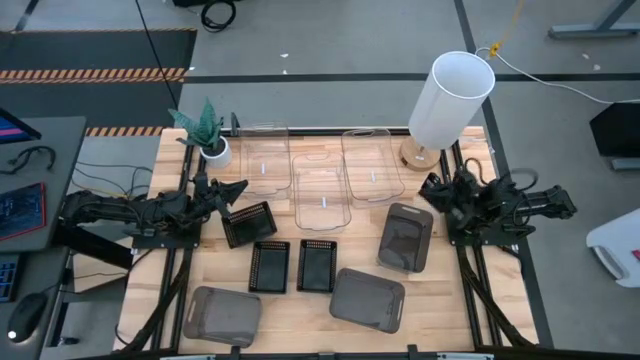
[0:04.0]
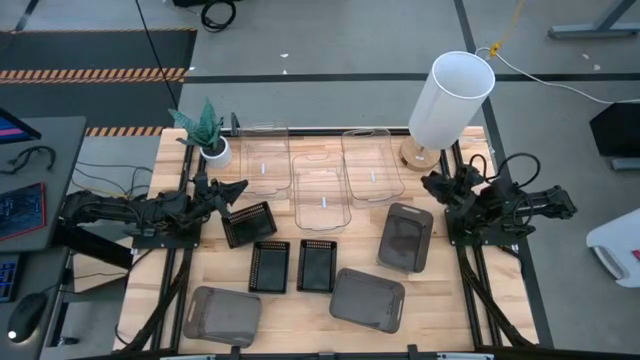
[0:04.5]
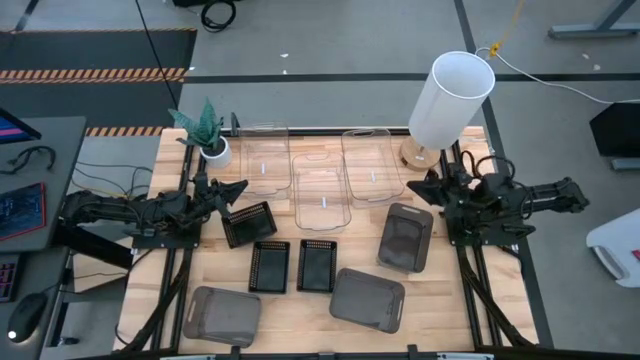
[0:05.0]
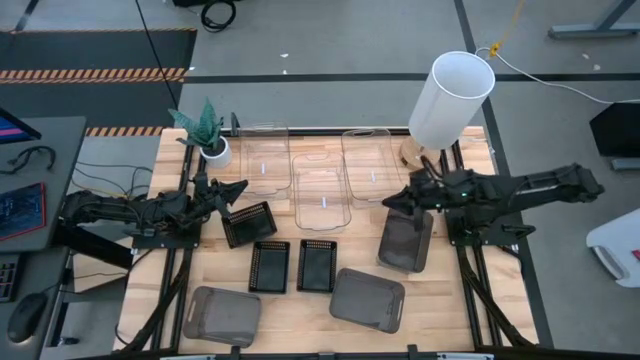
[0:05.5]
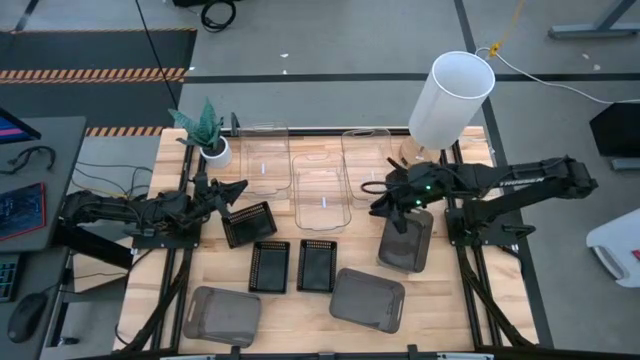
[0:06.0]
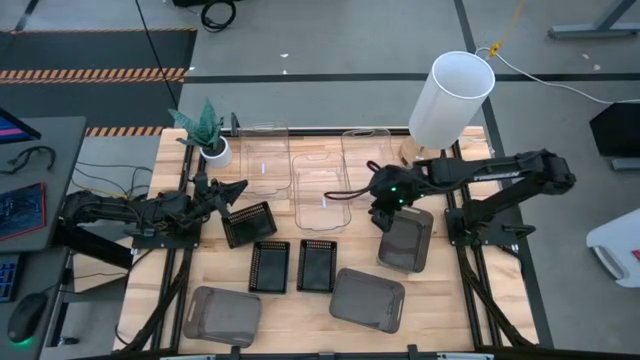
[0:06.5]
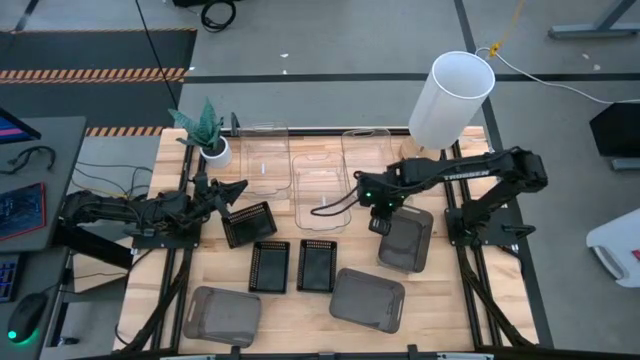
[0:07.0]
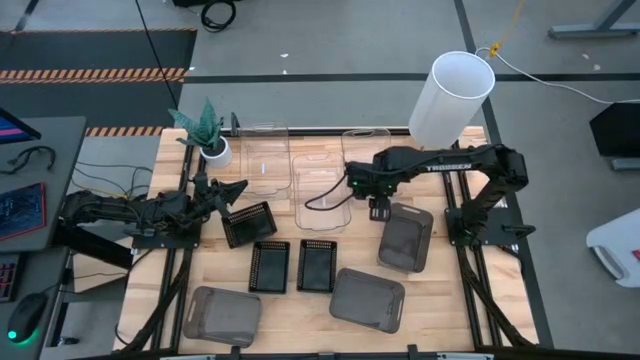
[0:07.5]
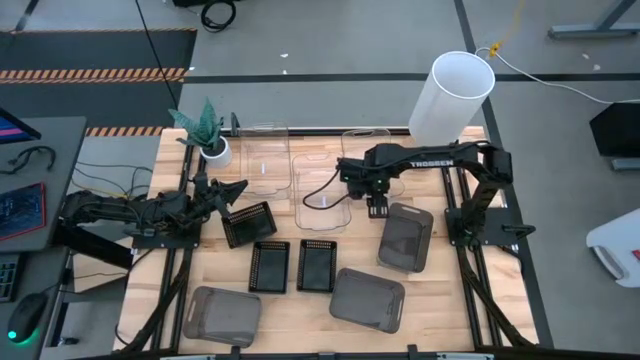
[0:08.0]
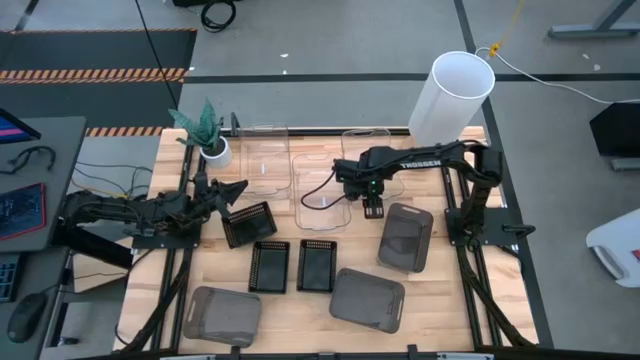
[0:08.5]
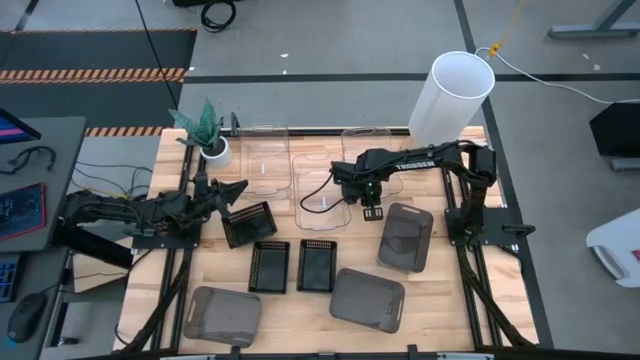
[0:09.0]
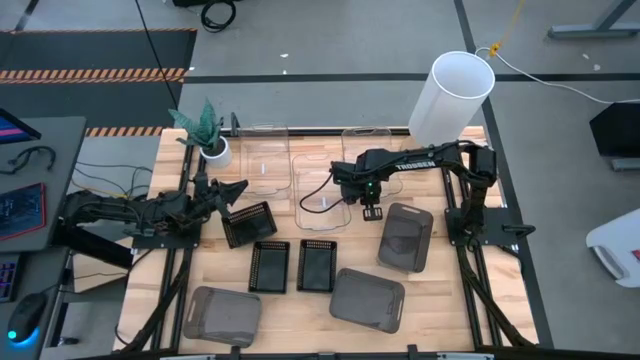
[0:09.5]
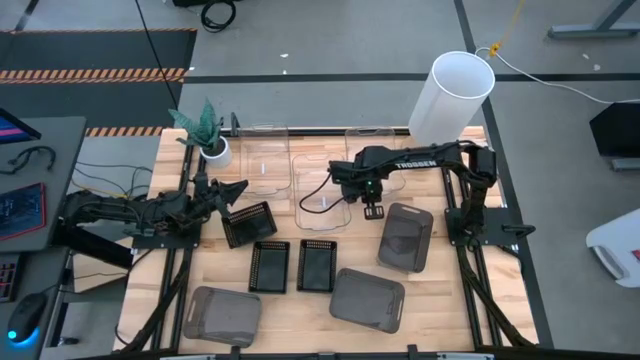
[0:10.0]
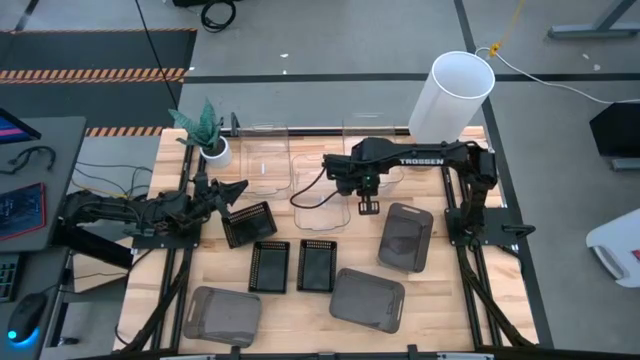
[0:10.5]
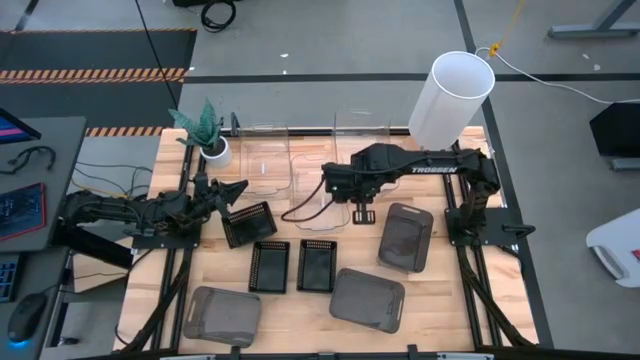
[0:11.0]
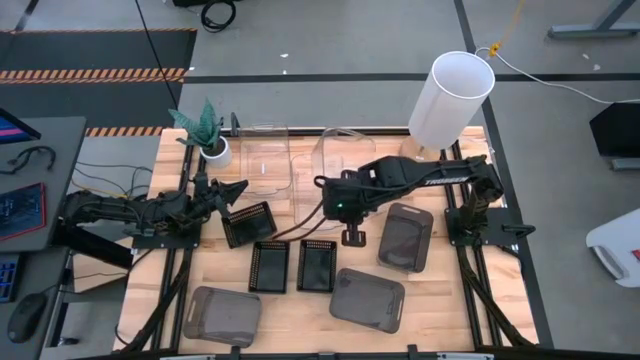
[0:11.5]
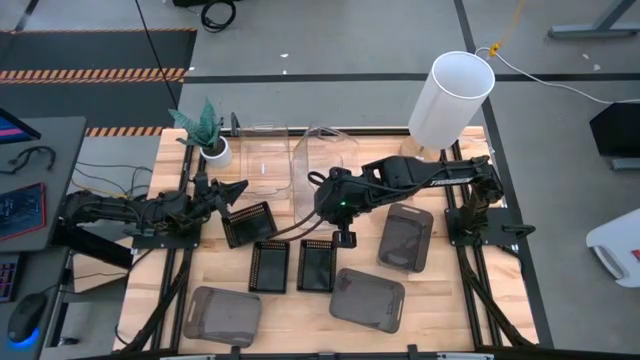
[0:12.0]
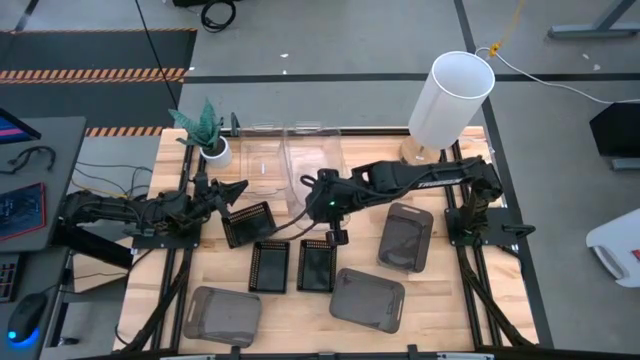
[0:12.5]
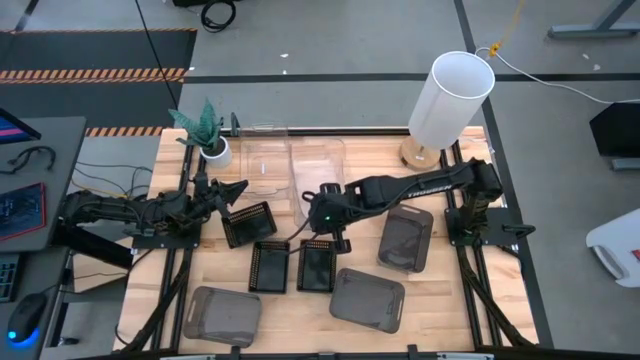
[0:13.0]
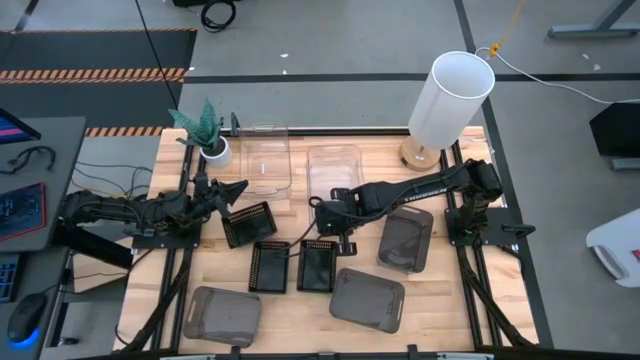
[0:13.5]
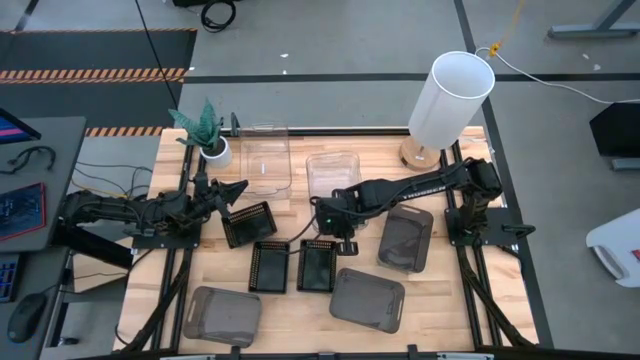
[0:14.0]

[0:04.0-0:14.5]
Stack the right transparent bin on the middle transparent bin

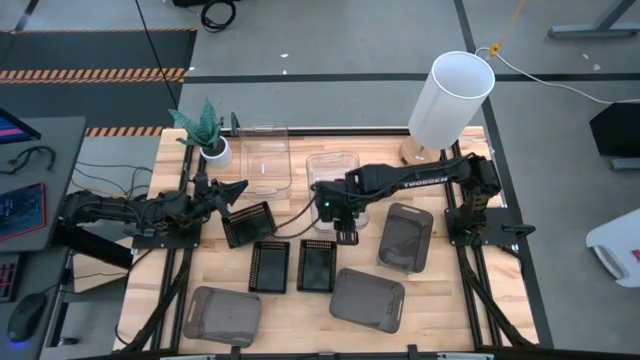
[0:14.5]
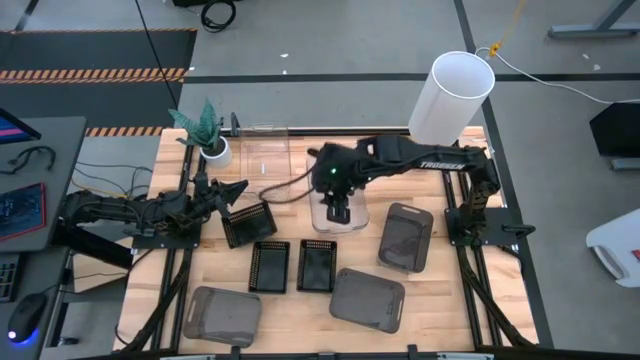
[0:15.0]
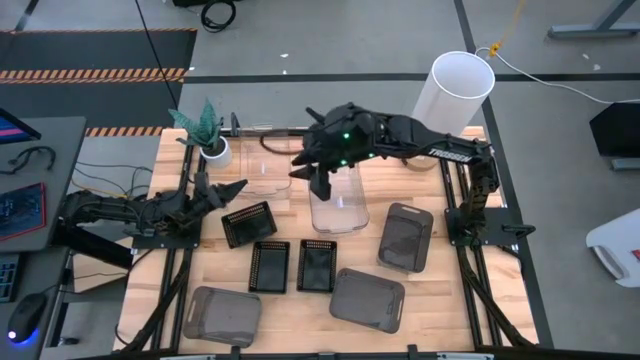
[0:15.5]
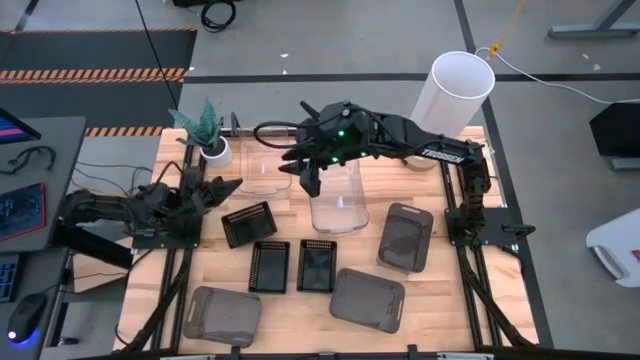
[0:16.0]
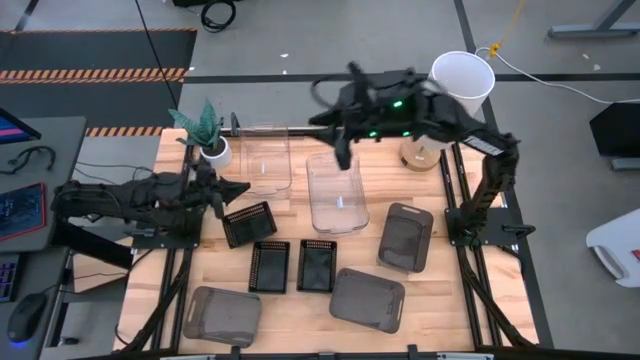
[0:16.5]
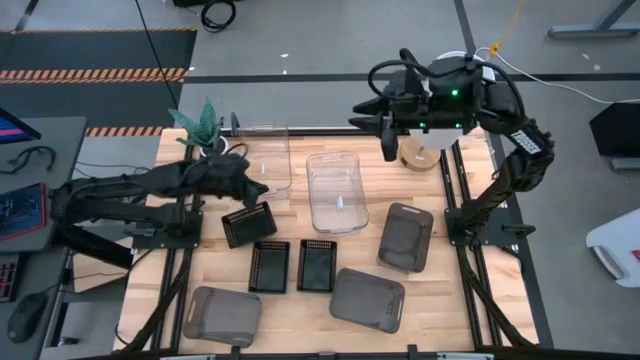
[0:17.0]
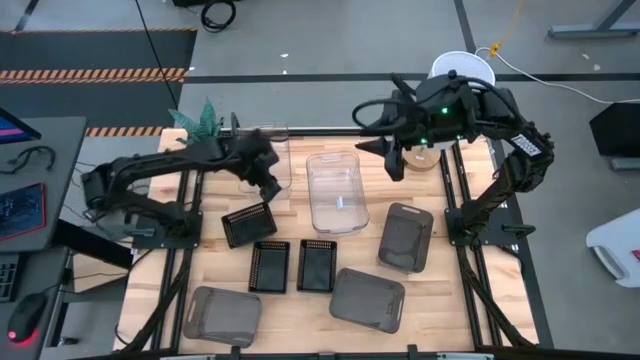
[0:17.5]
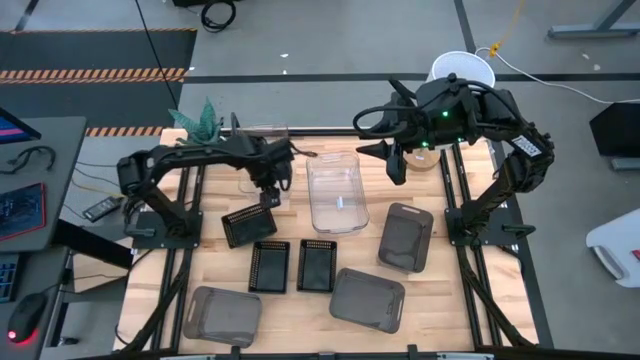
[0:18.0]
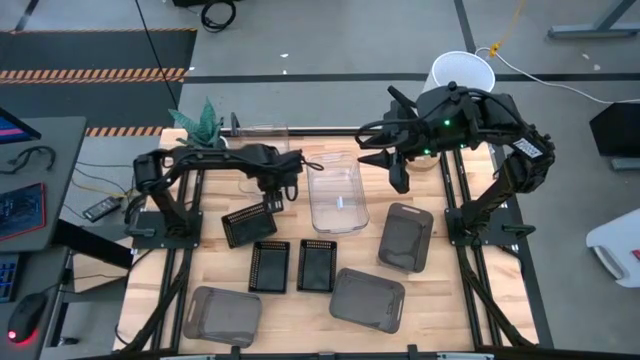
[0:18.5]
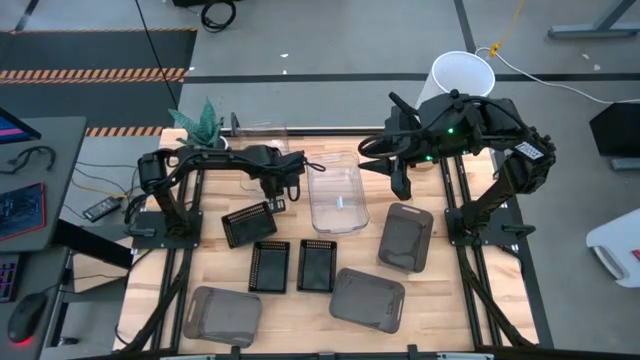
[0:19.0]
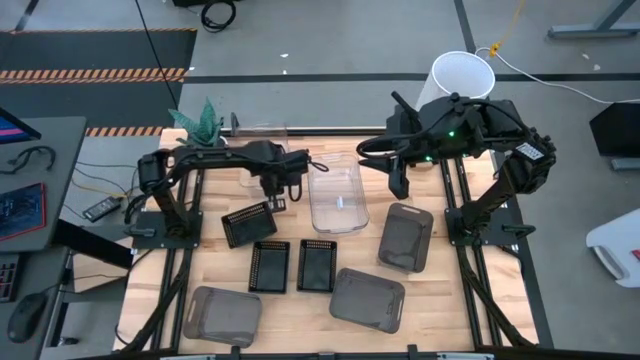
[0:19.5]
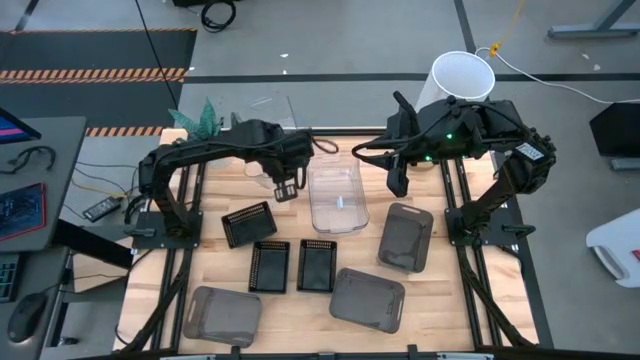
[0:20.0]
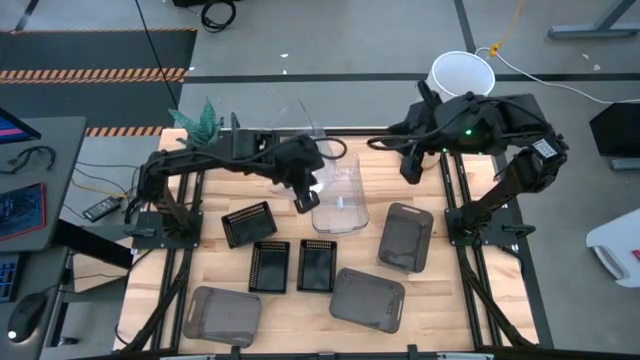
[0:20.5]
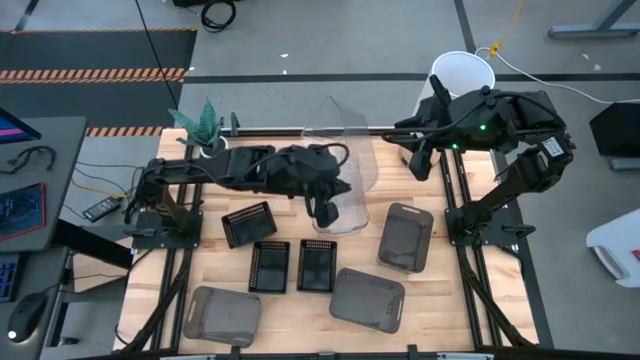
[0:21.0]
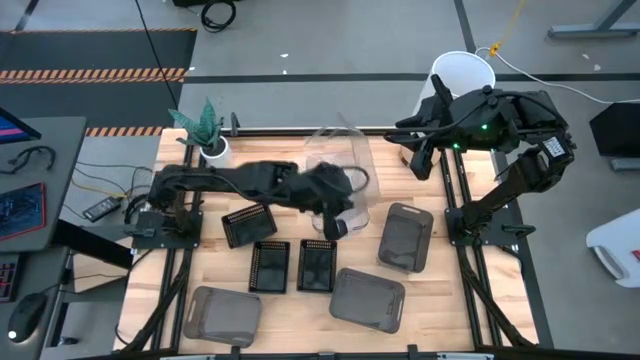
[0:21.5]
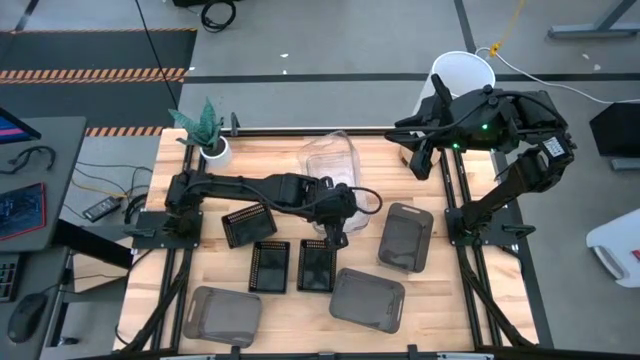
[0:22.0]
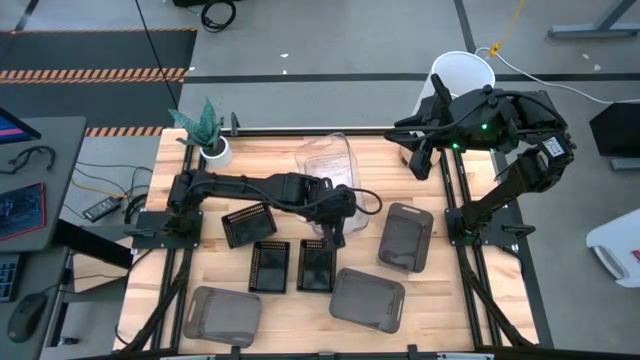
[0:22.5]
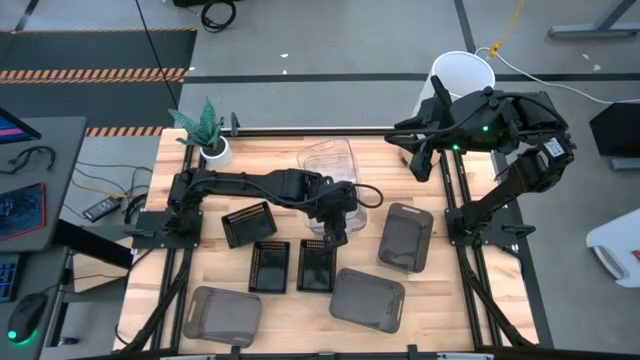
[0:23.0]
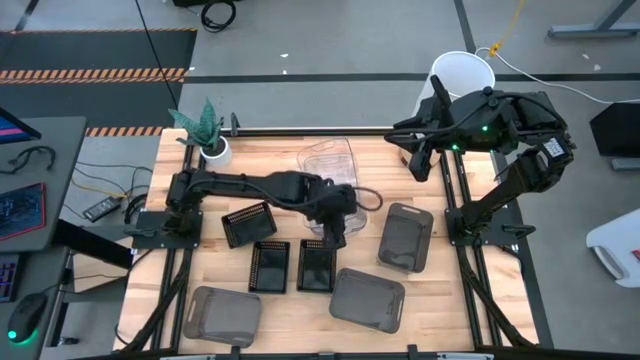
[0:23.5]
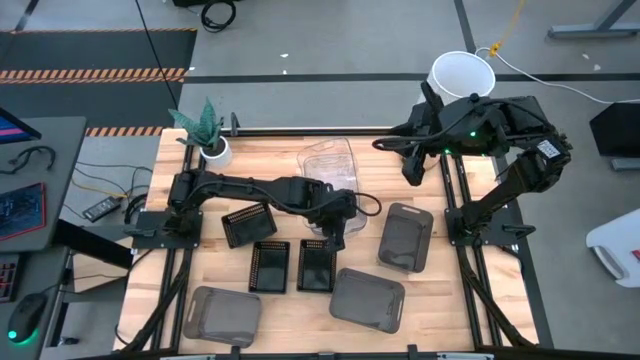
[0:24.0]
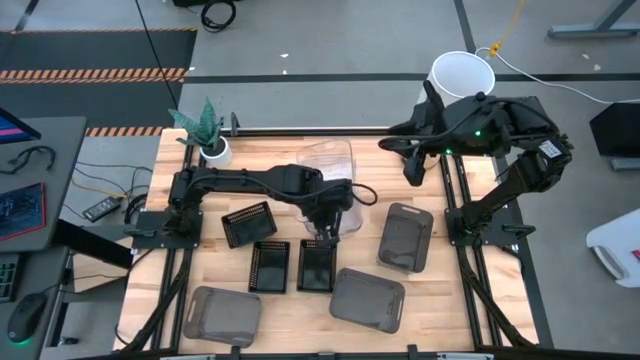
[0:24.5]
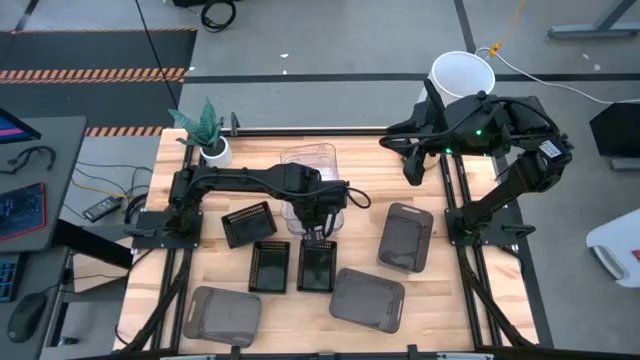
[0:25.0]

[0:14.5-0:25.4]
Stack the left transparent bin on the transparent bins
